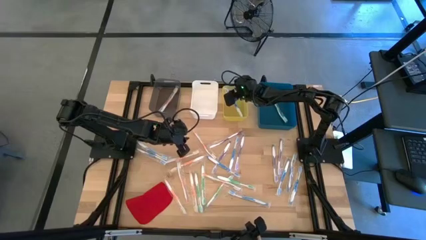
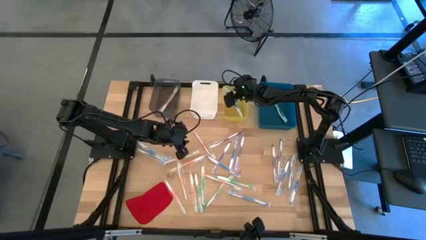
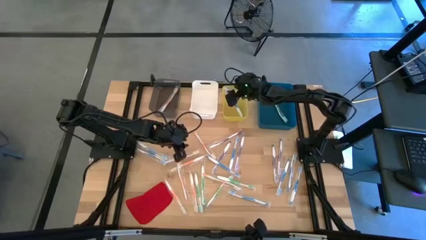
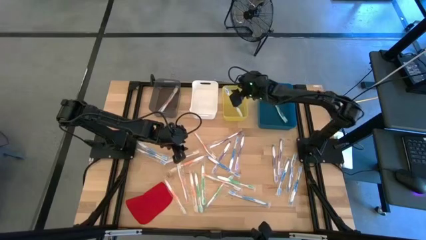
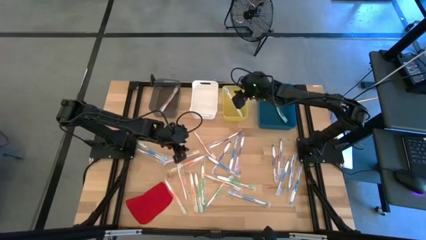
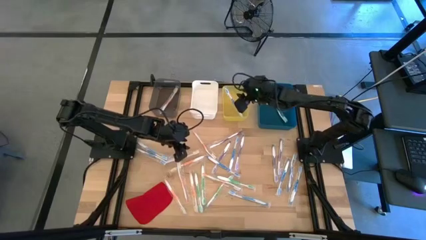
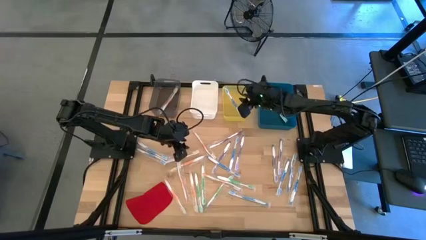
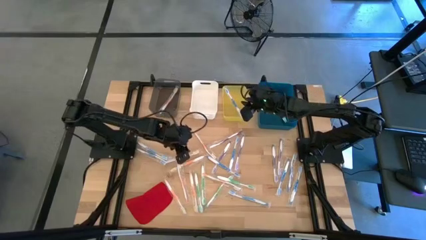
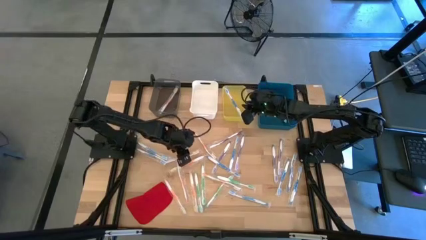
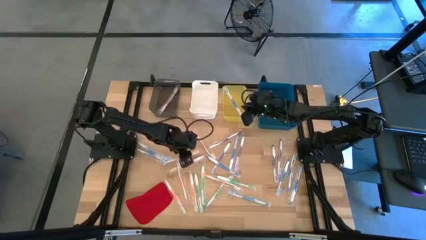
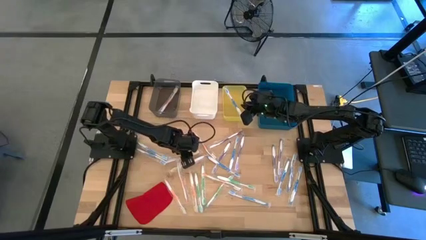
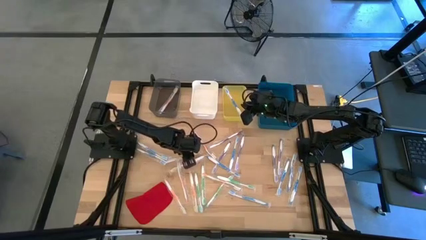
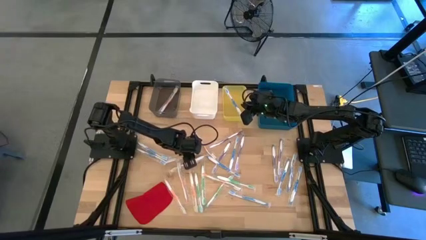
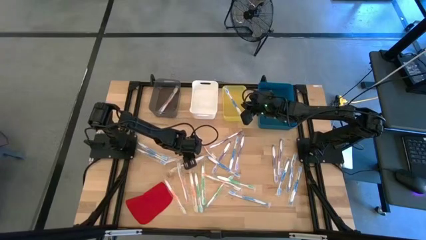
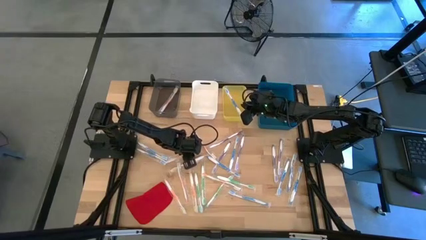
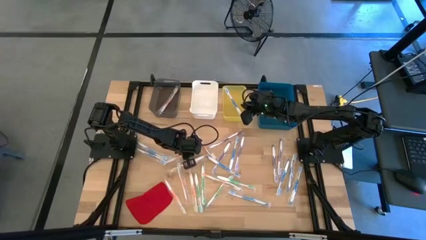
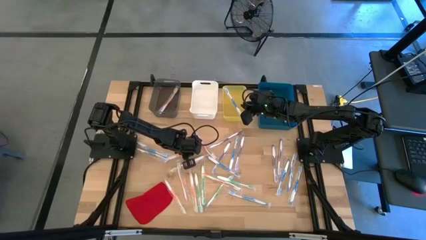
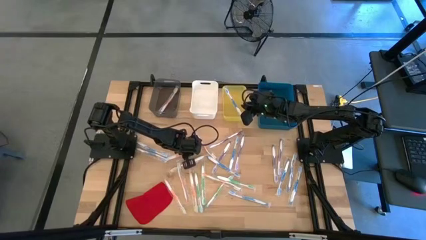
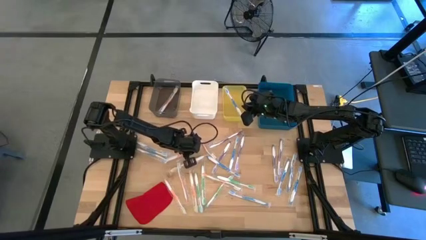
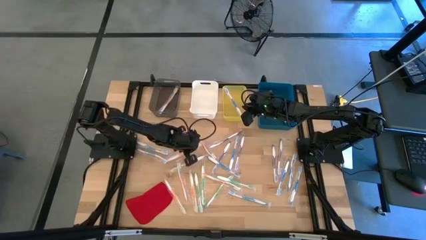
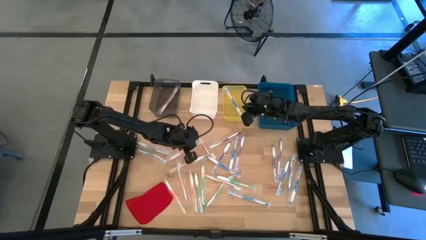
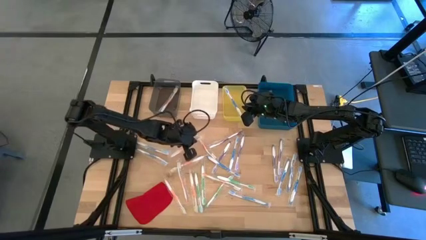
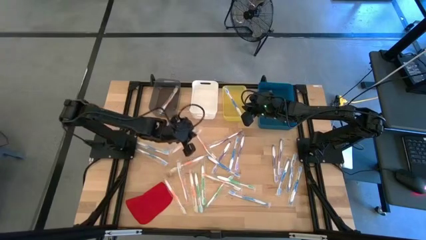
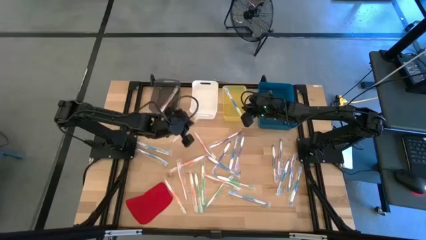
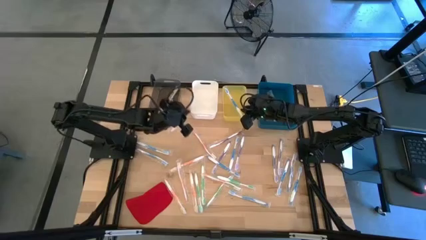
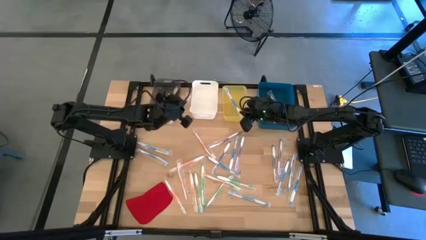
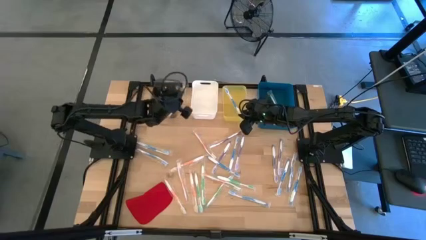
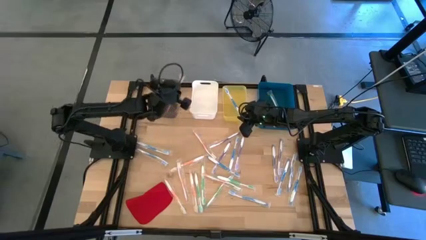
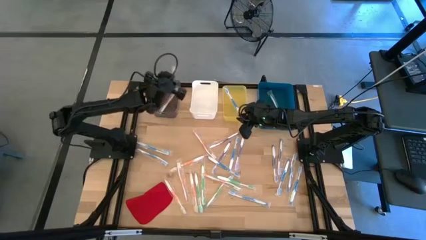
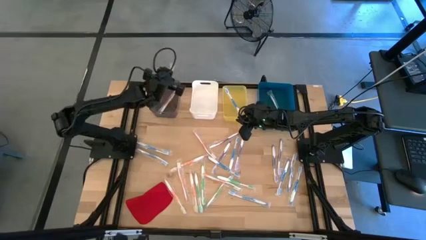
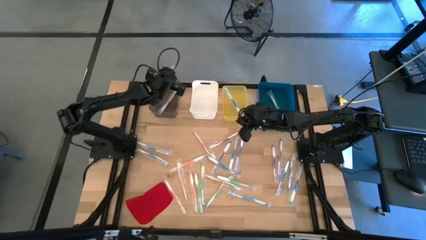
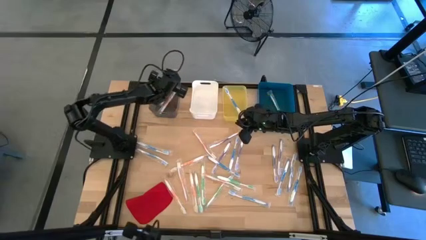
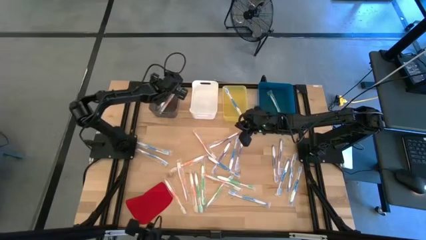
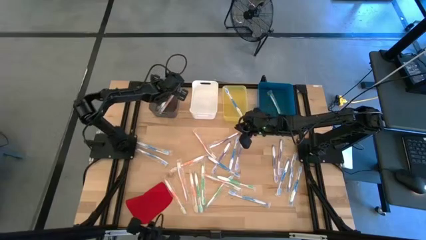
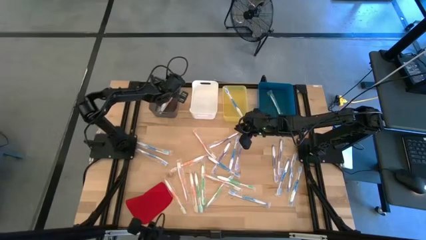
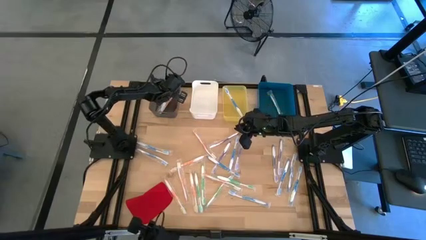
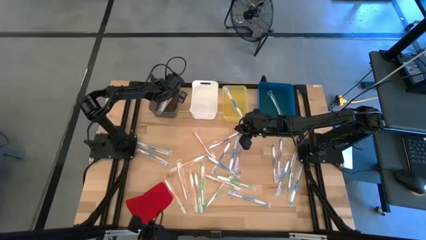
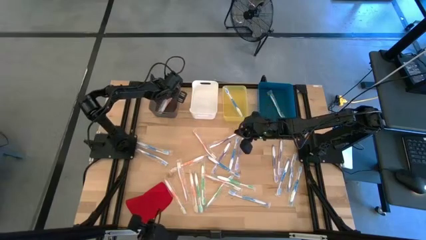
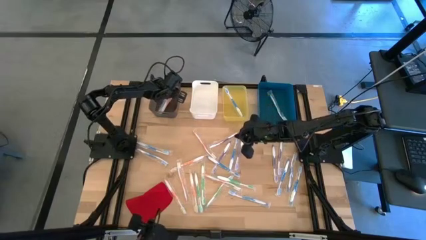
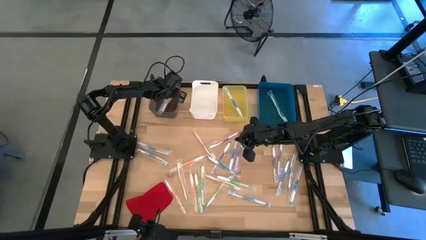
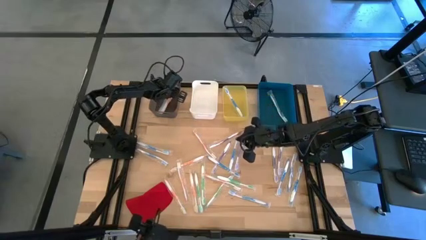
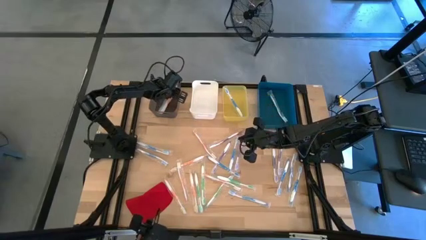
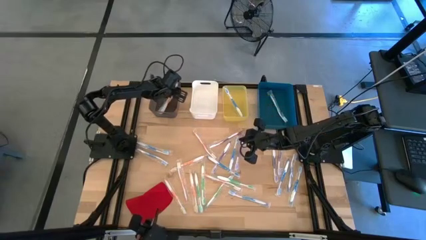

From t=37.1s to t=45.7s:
Task: Pick & Place Toothbrushes
Put the orange toothbrush into the black bin

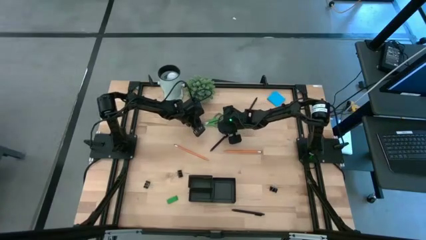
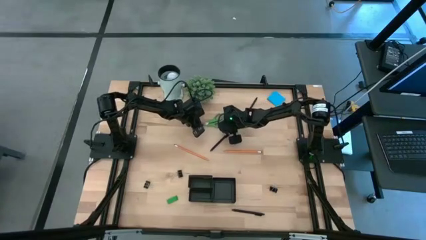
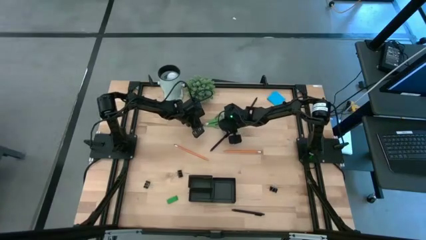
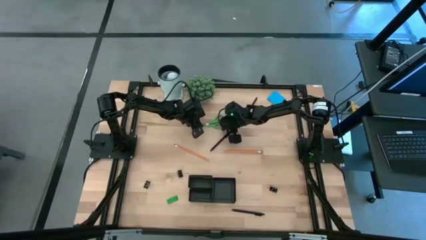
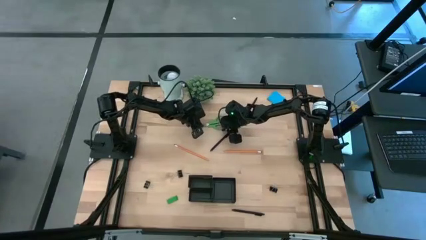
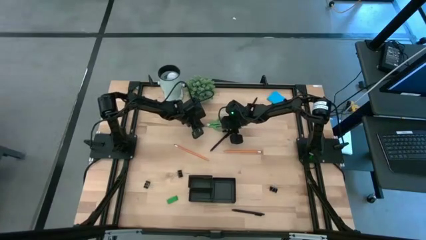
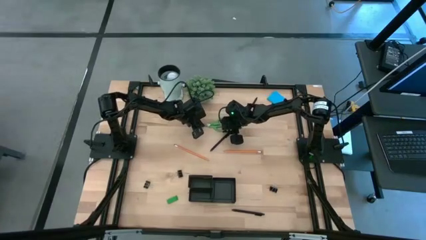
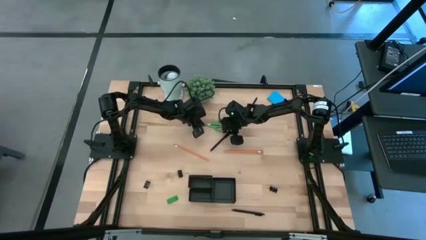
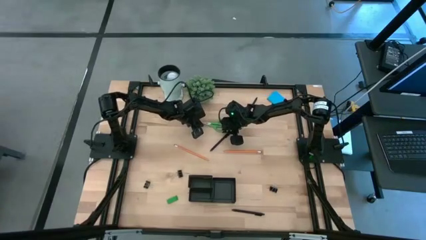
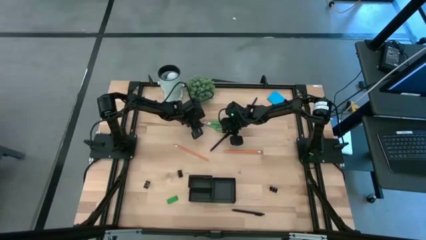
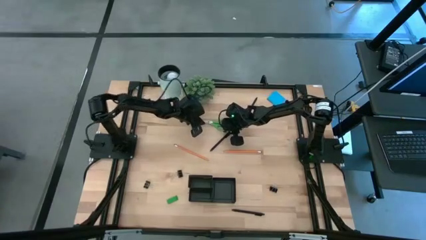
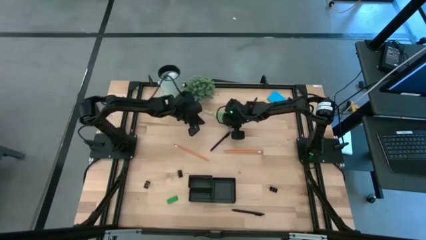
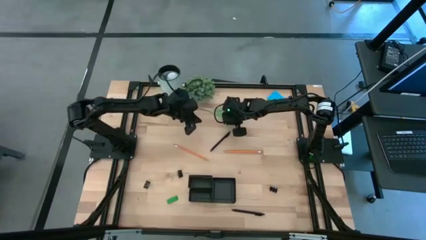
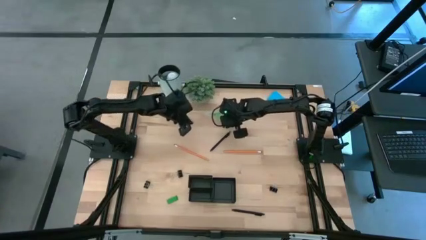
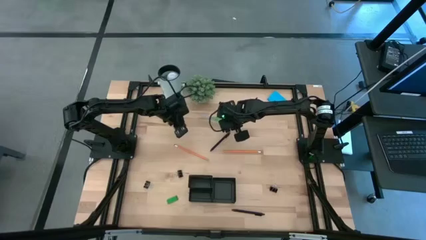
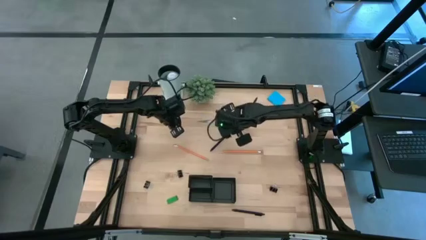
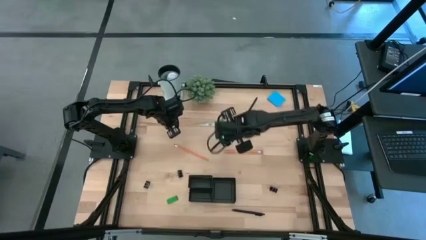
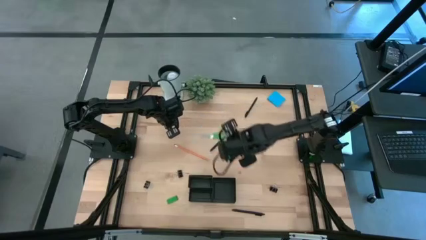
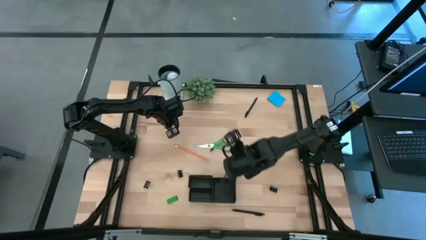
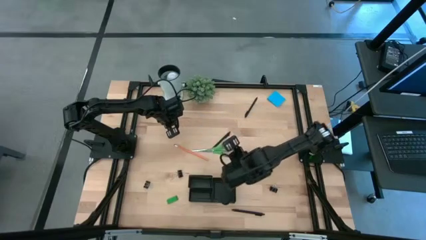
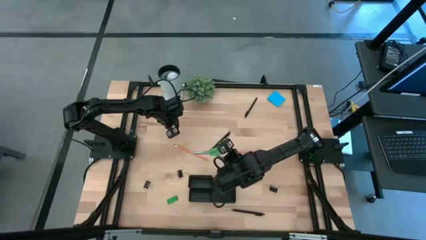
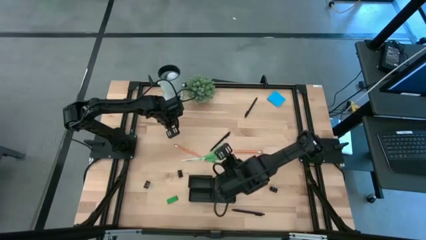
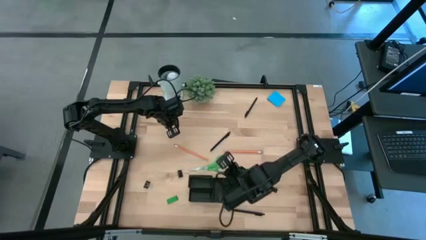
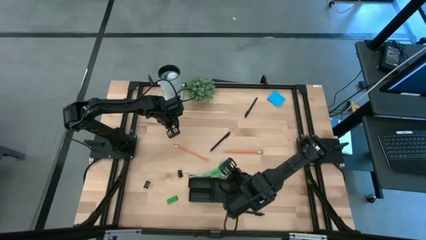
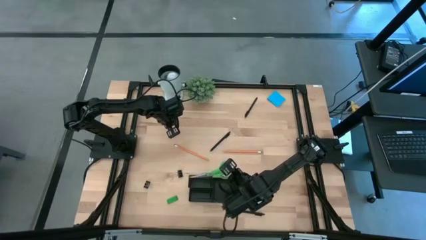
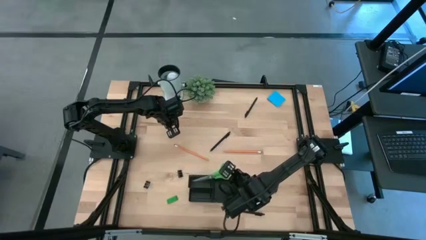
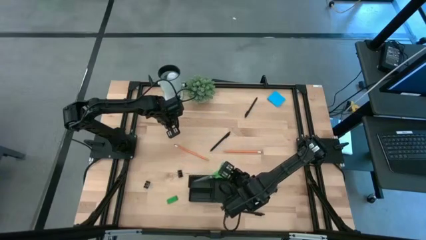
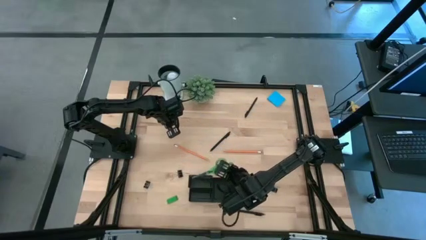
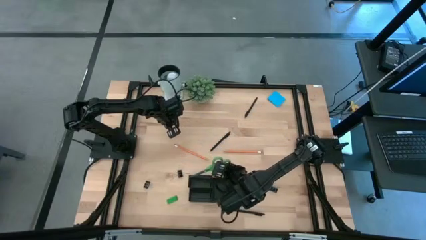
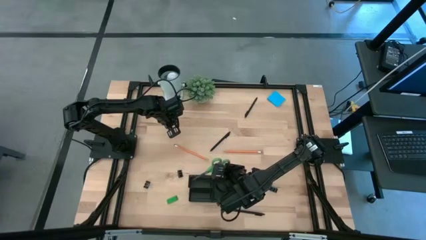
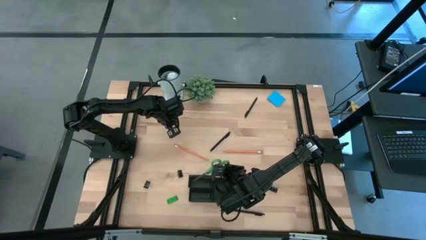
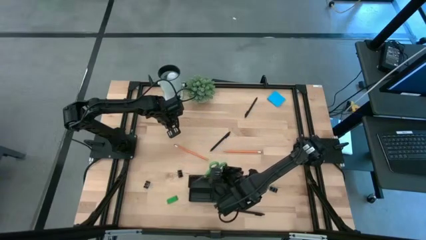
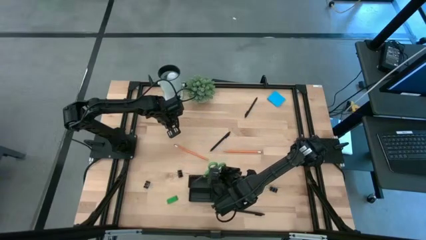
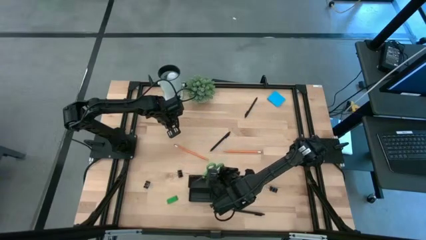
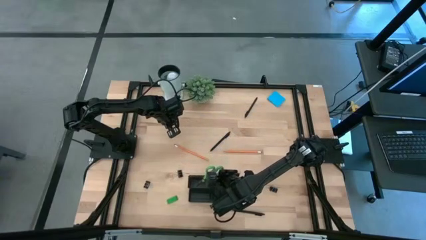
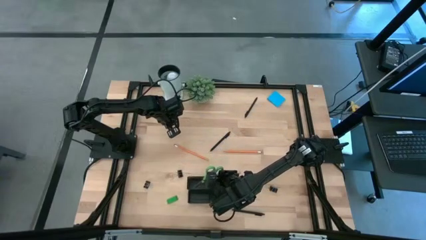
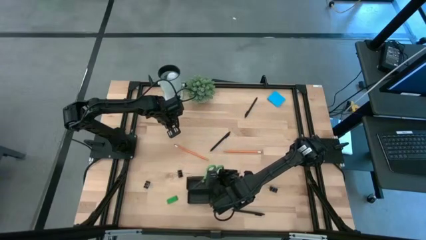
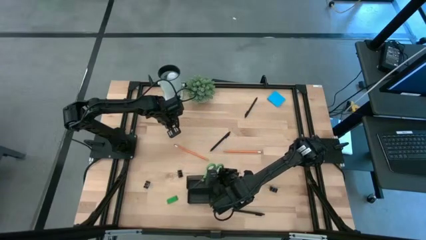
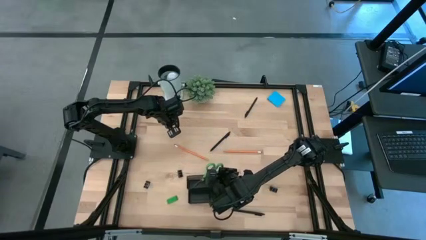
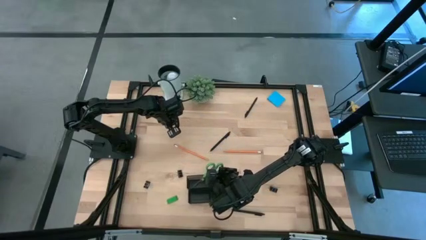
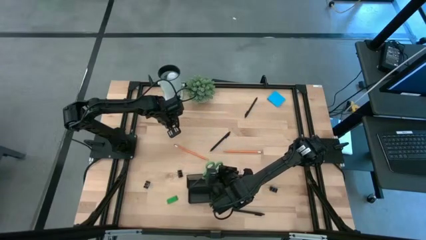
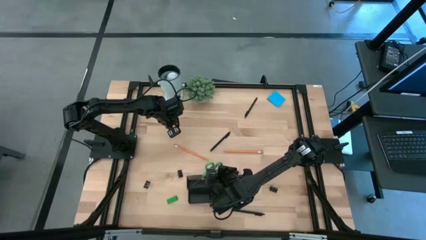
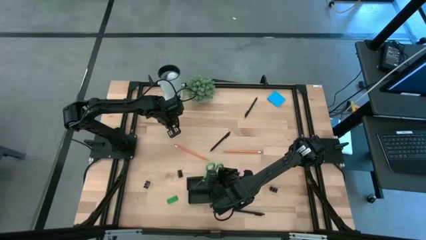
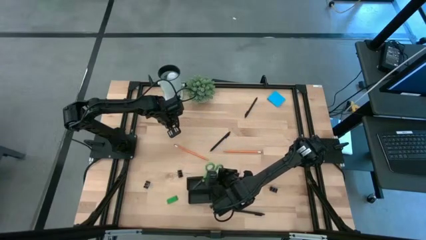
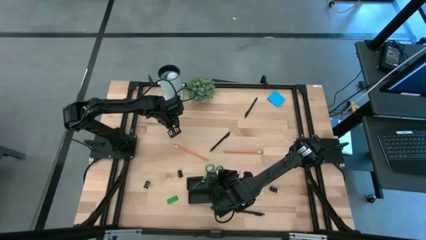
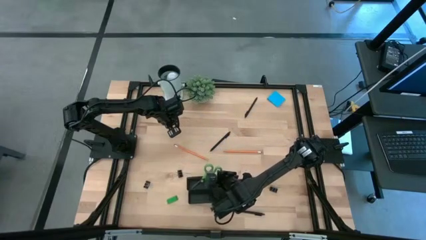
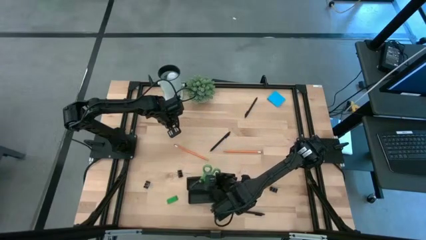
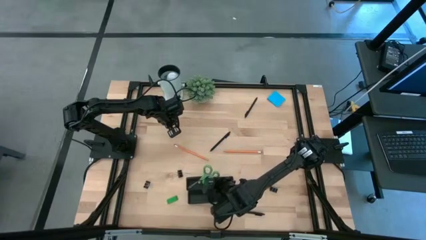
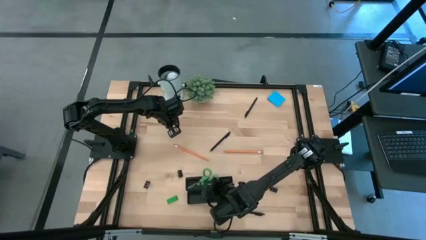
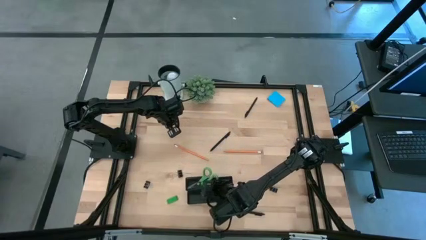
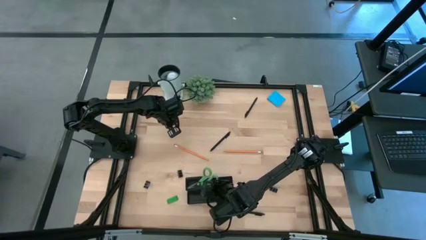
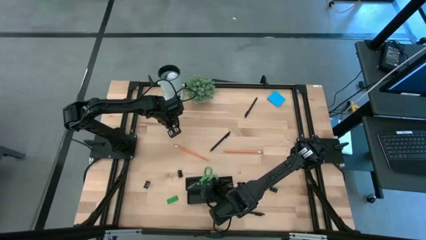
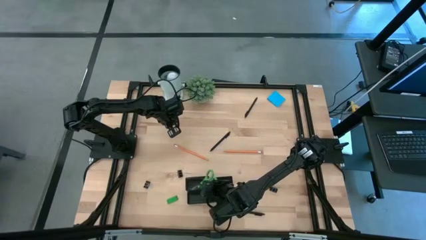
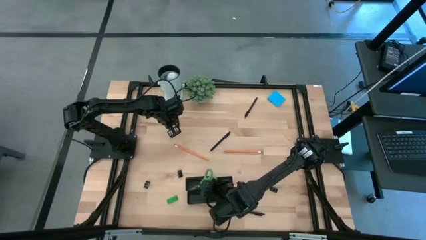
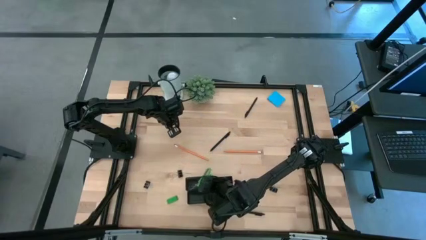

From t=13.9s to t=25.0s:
Task: Pick and place office supplies into organizer
Put the green scissors into the black desk organizer
